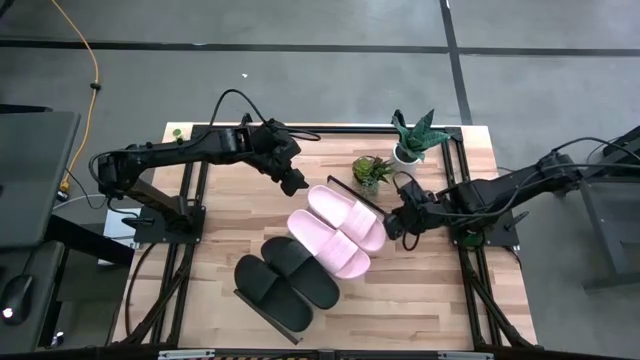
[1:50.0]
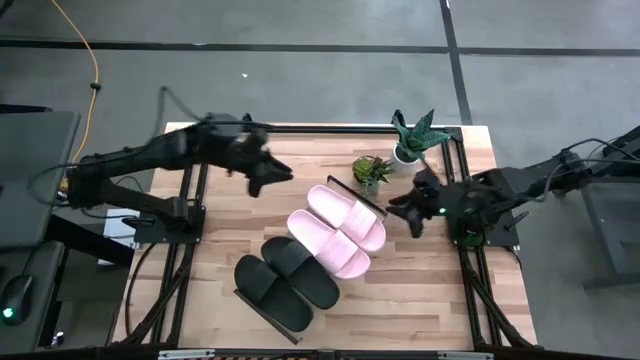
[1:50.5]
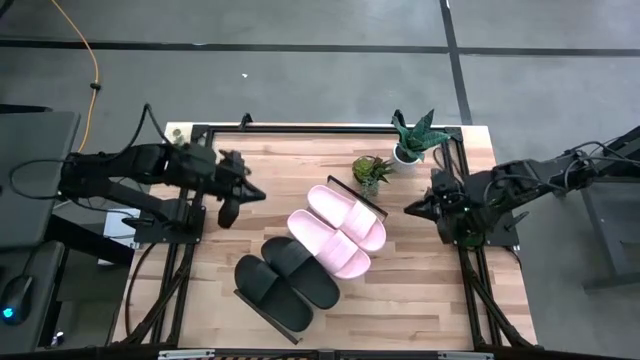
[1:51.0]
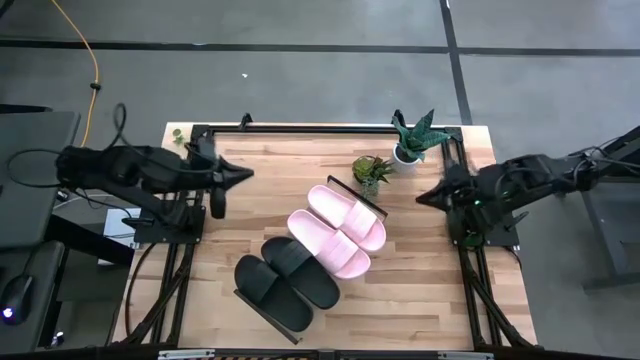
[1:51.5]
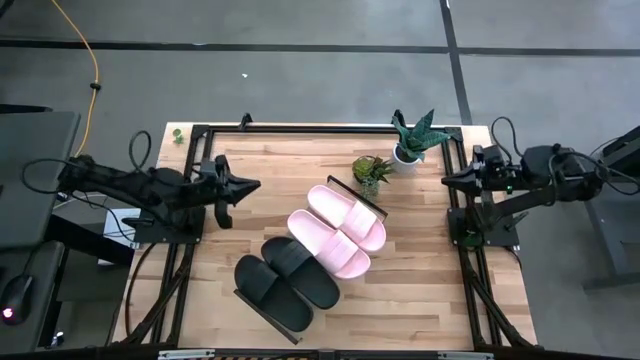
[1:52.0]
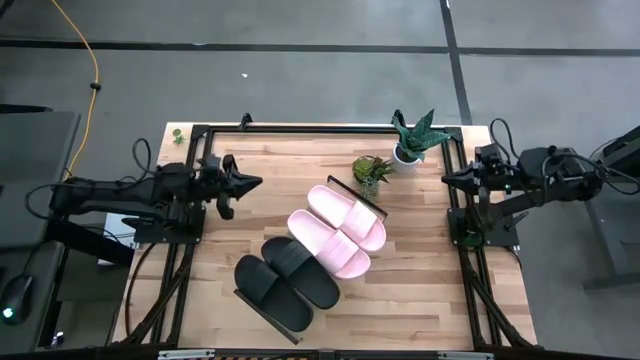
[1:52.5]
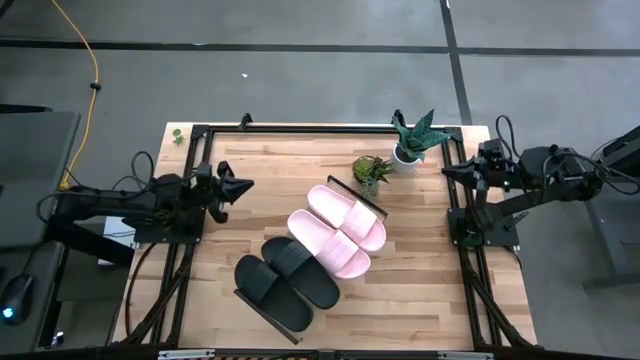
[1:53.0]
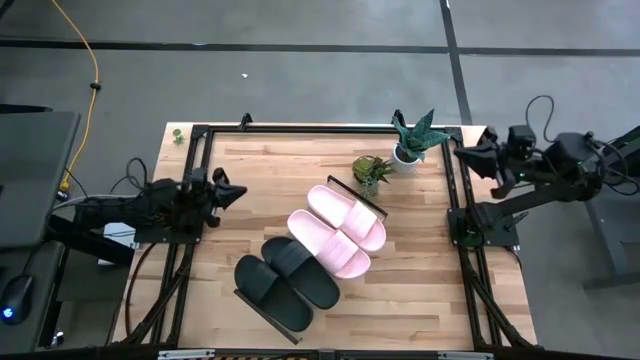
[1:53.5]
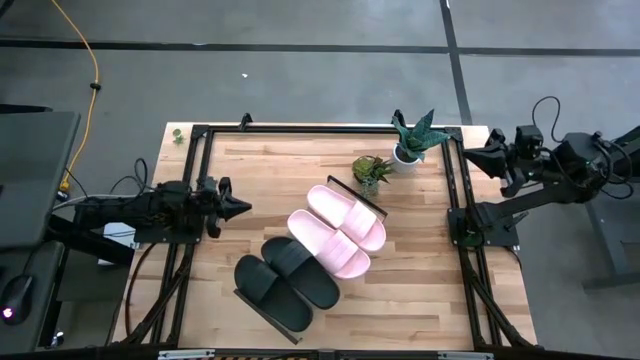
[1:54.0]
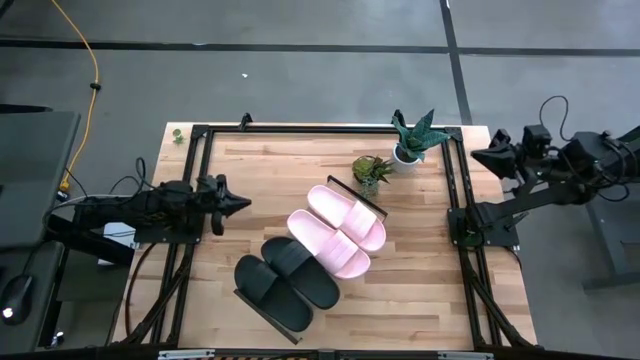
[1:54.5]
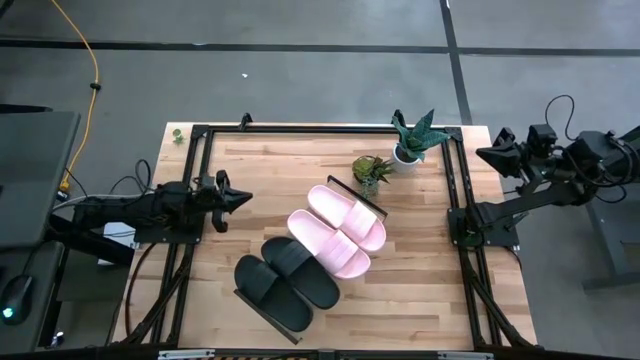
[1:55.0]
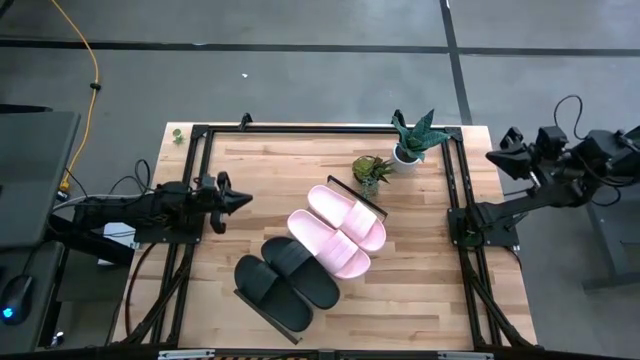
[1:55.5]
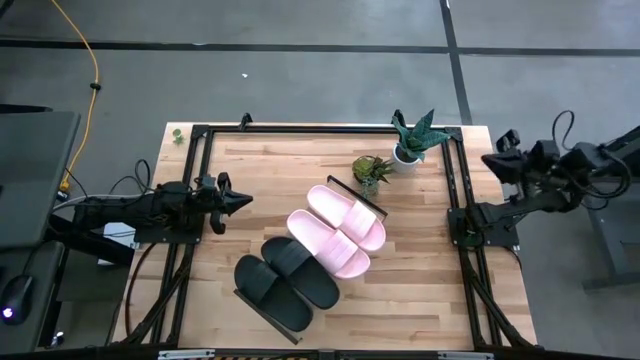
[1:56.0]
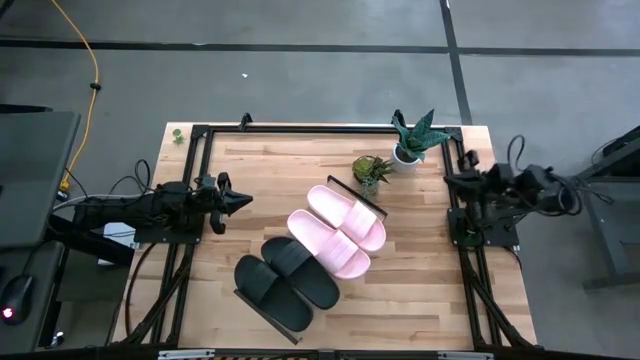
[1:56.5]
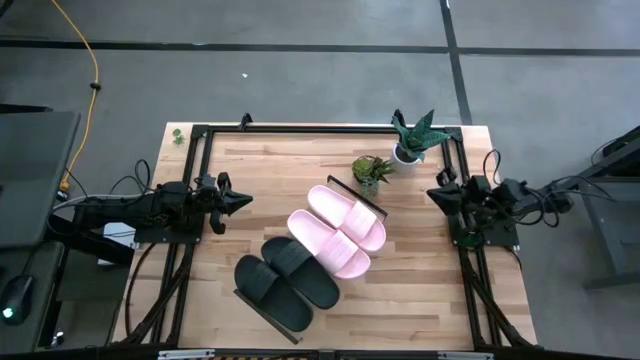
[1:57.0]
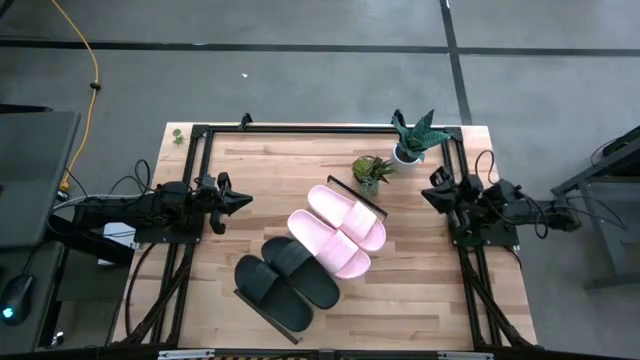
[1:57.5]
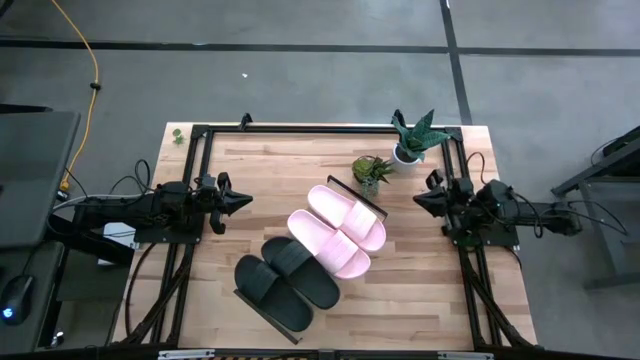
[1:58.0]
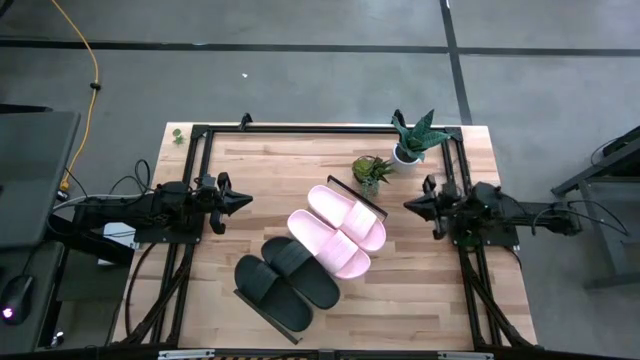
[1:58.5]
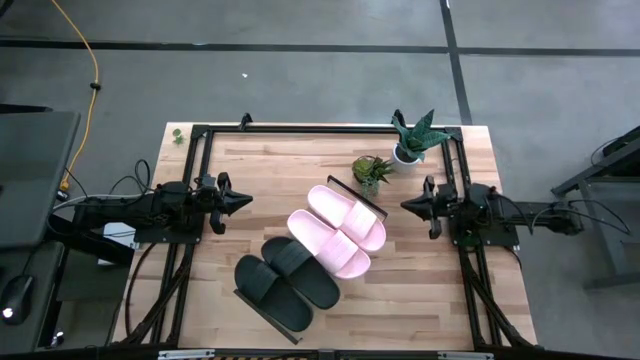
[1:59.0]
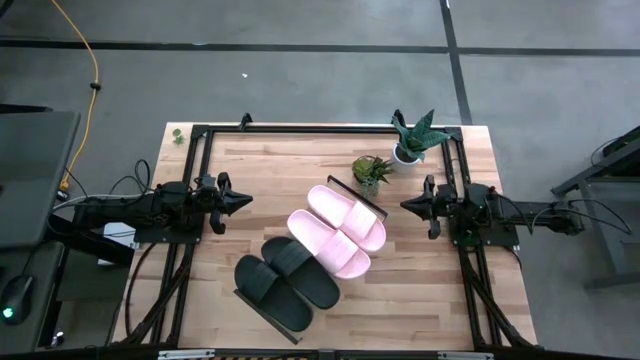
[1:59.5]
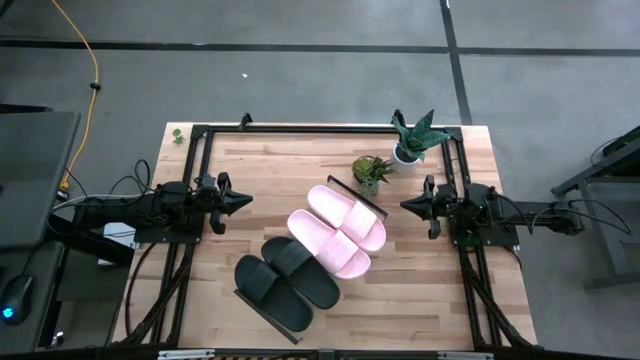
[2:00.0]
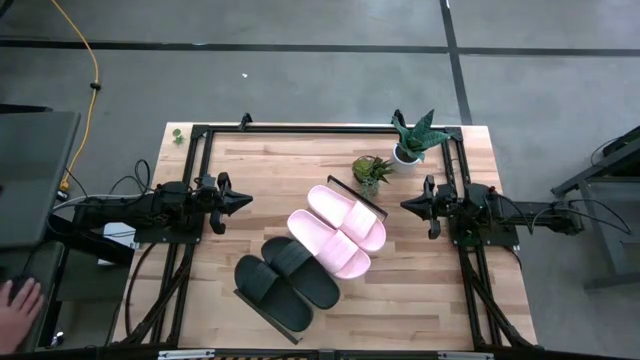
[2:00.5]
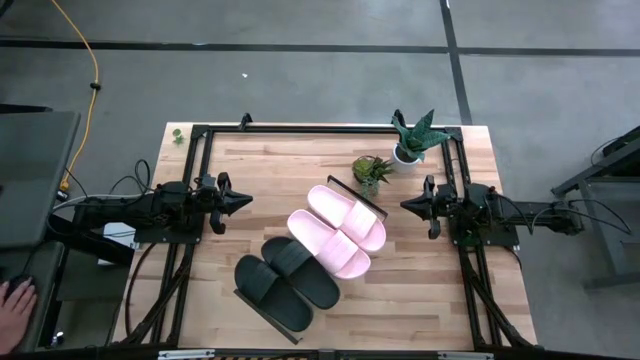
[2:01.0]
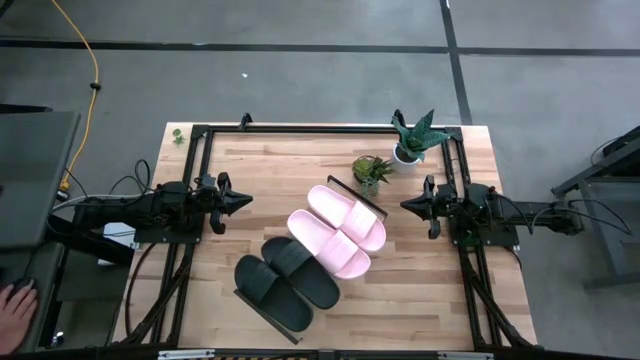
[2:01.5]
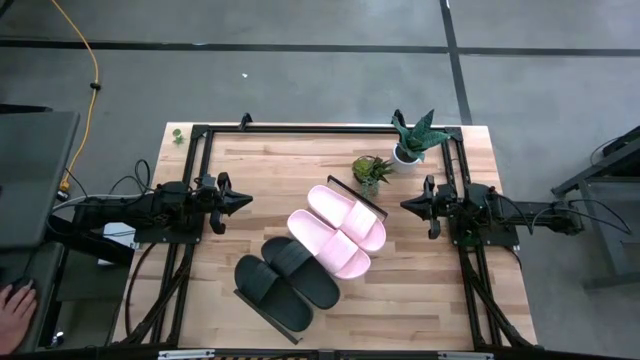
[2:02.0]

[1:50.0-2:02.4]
Task: Pick and place slides into the shelf
Return to Home Position

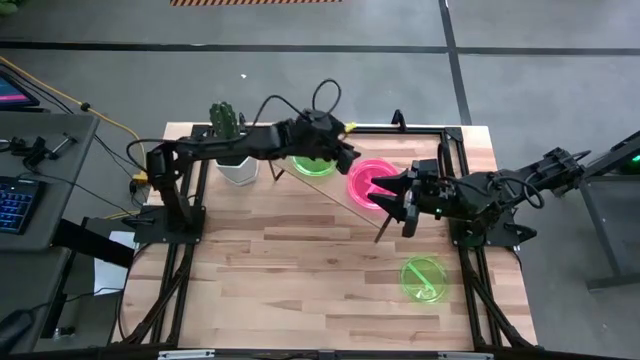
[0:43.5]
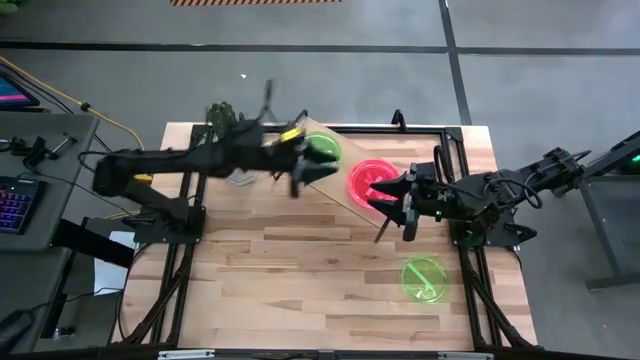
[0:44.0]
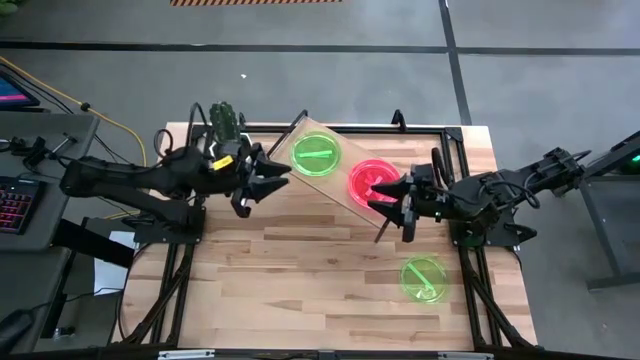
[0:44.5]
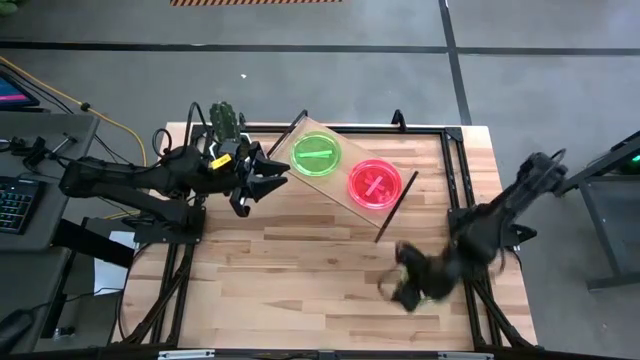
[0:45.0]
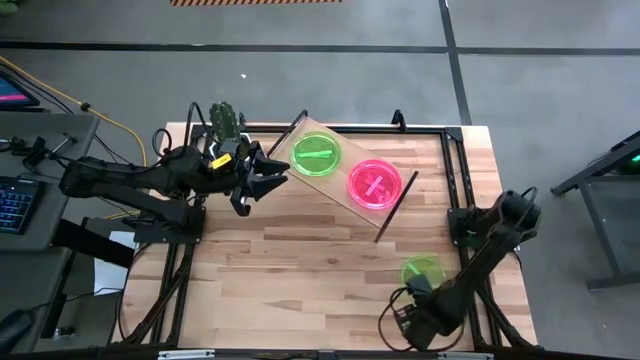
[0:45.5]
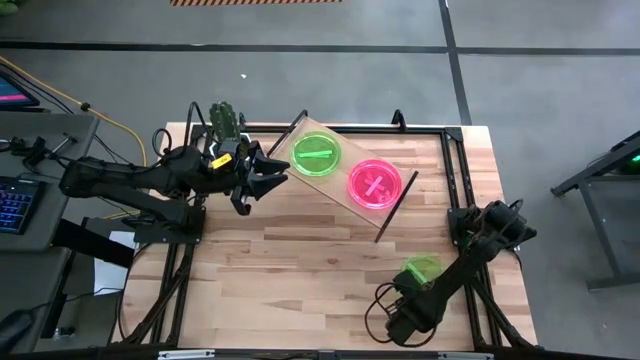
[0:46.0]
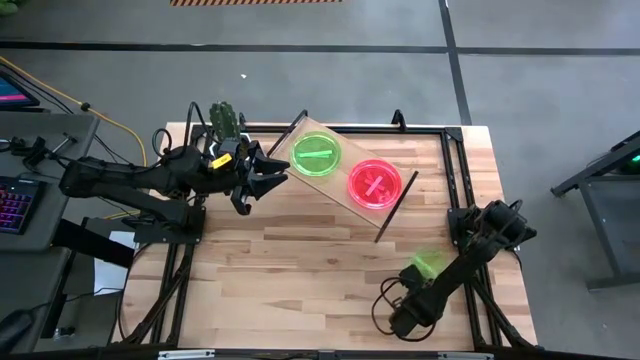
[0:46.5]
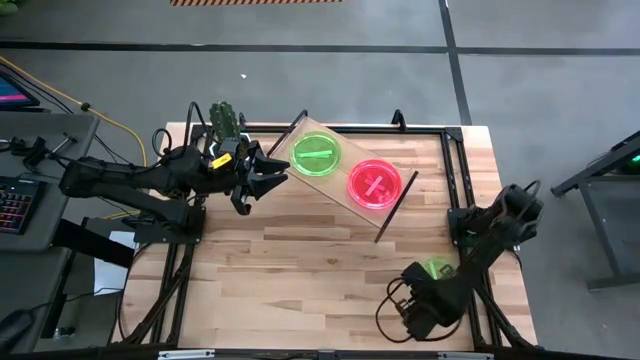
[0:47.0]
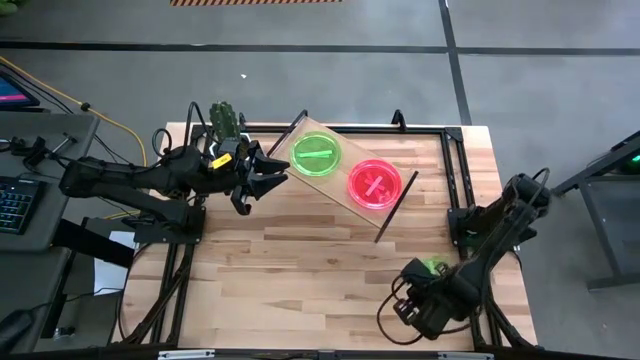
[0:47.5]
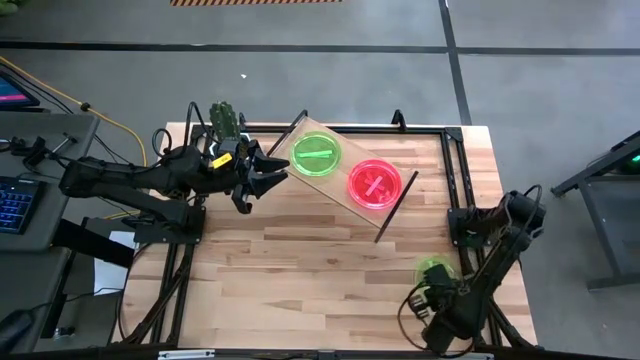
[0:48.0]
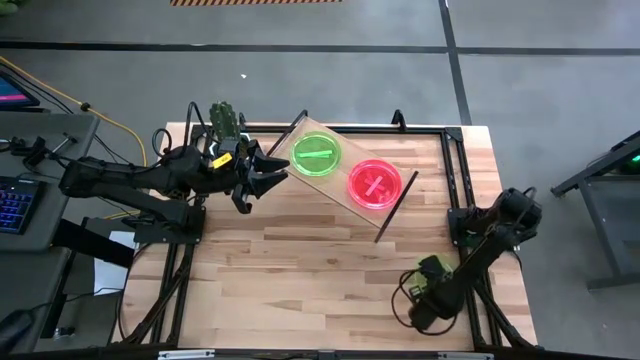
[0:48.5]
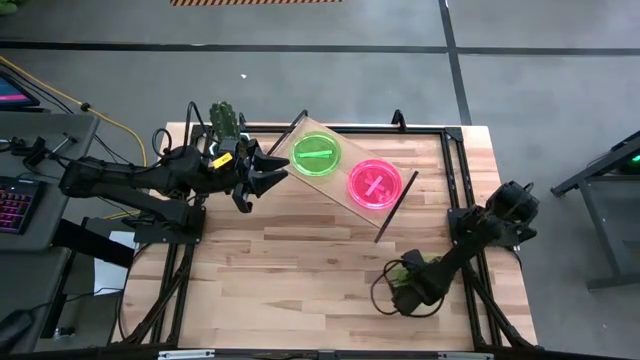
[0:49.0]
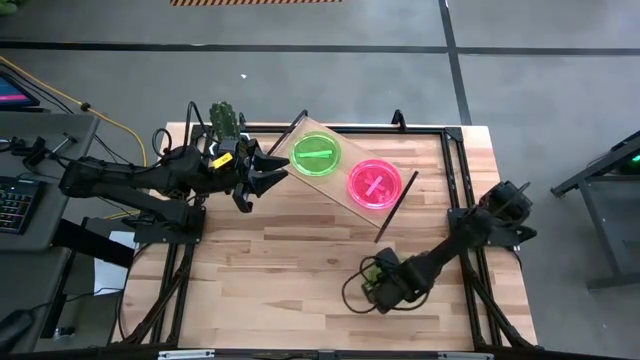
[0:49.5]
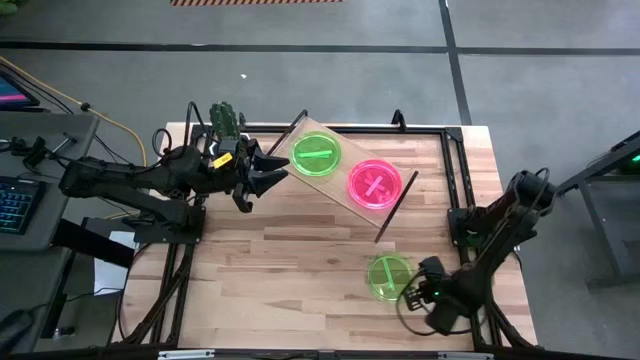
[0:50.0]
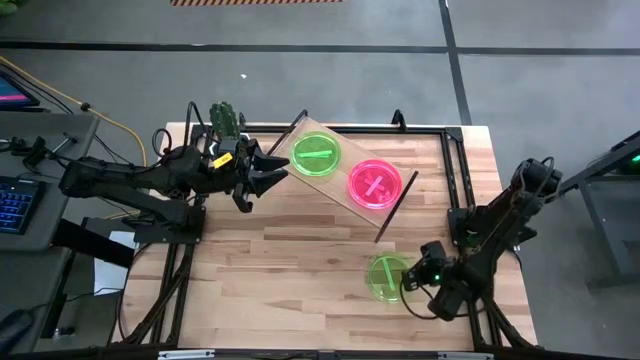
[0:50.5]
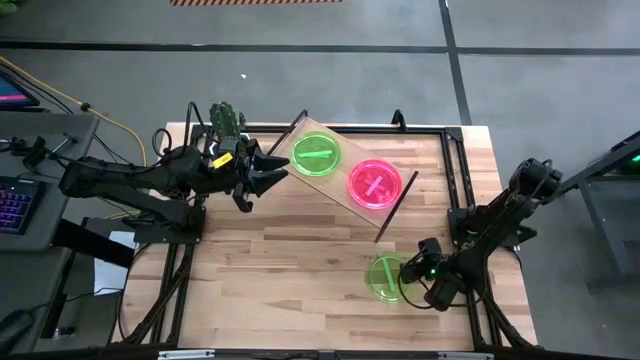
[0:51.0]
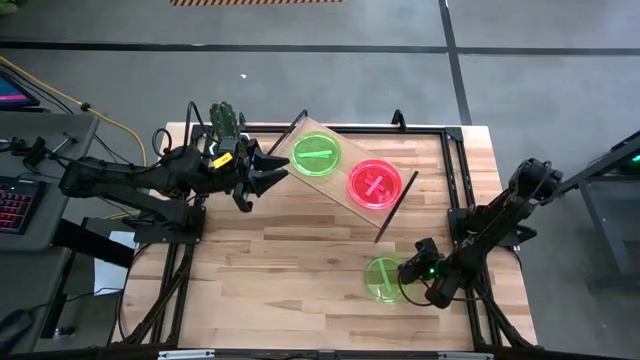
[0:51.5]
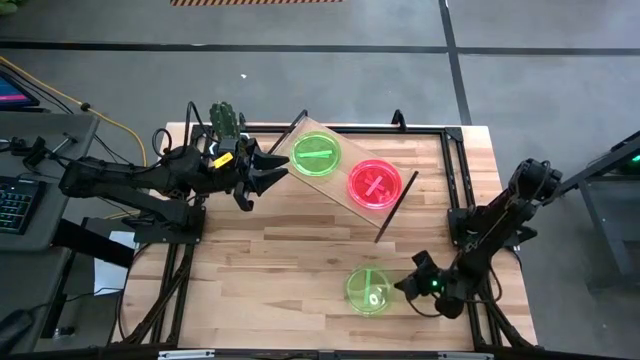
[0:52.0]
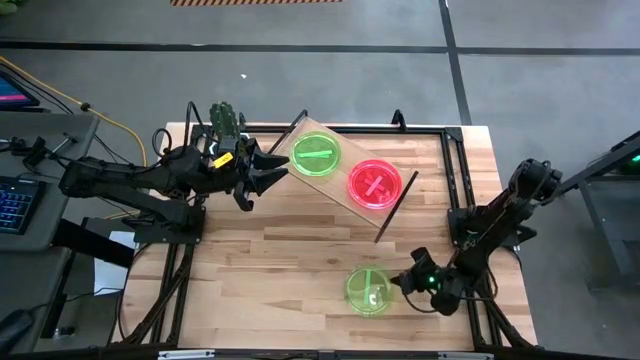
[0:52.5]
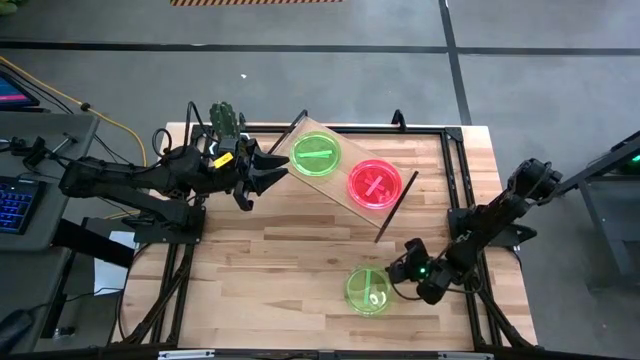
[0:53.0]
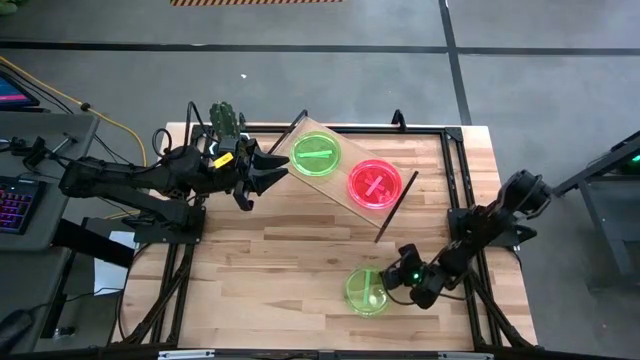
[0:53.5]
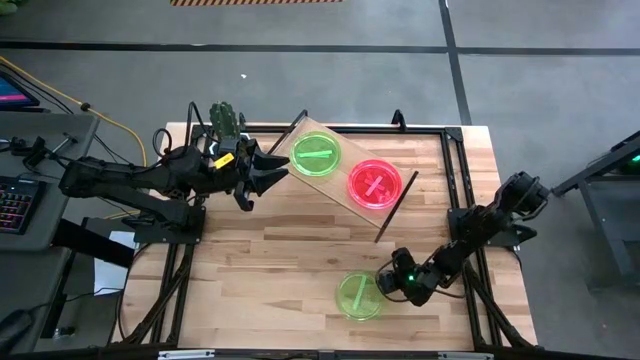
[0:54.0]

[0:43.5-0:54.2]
Task: Place and stack plates onto a shelf
Stack the light green plate on top of the light green plate on the shelf
